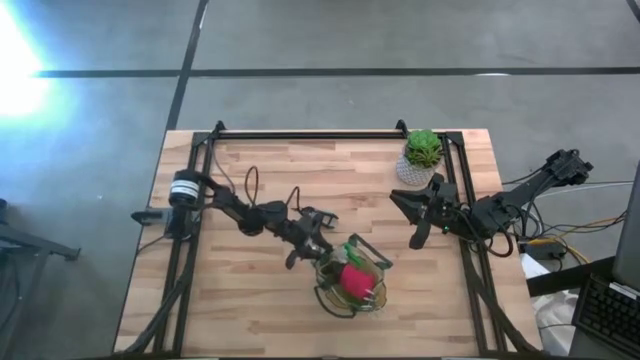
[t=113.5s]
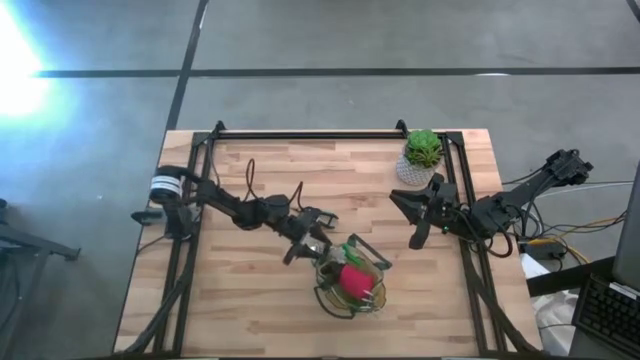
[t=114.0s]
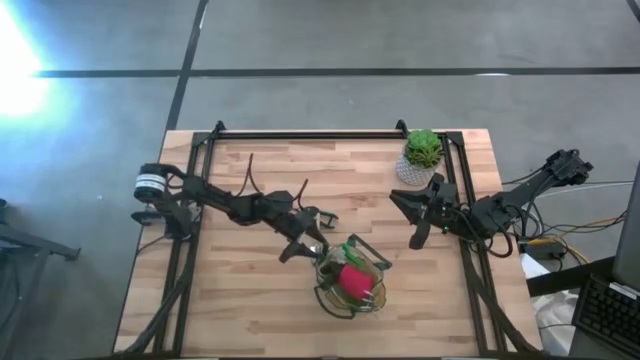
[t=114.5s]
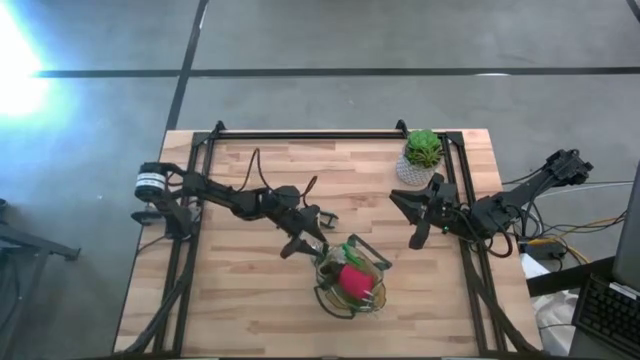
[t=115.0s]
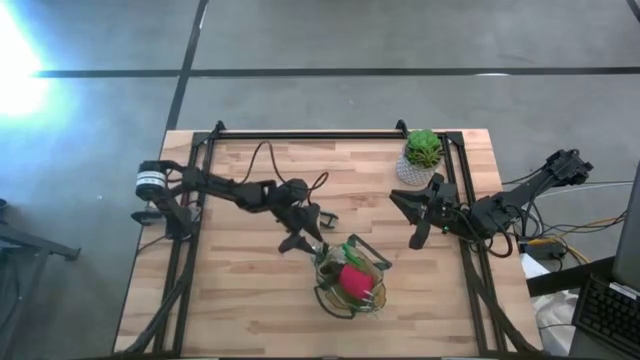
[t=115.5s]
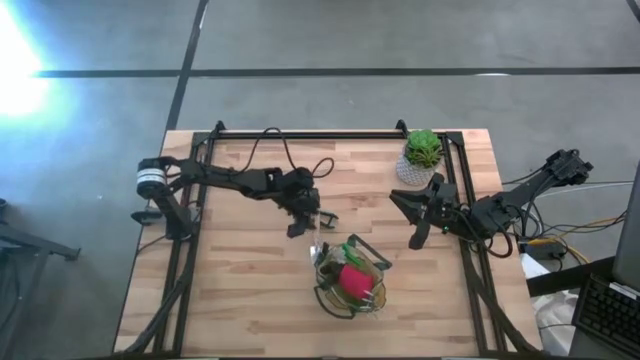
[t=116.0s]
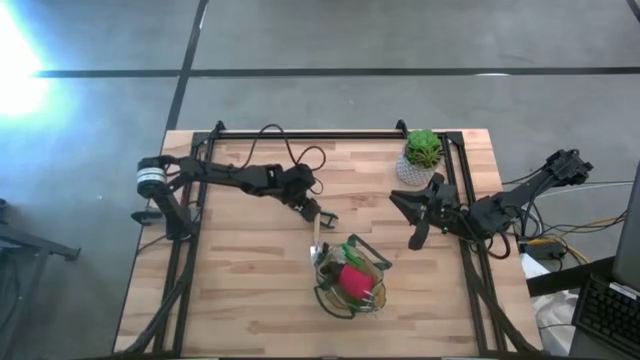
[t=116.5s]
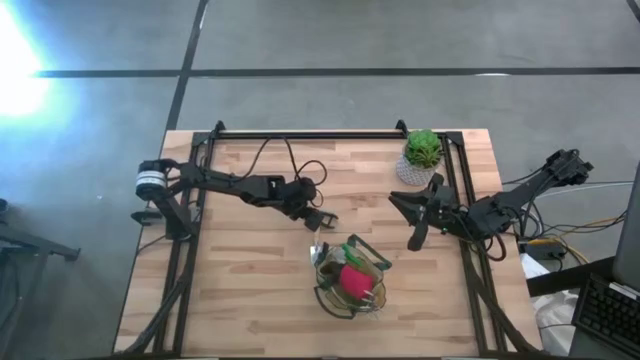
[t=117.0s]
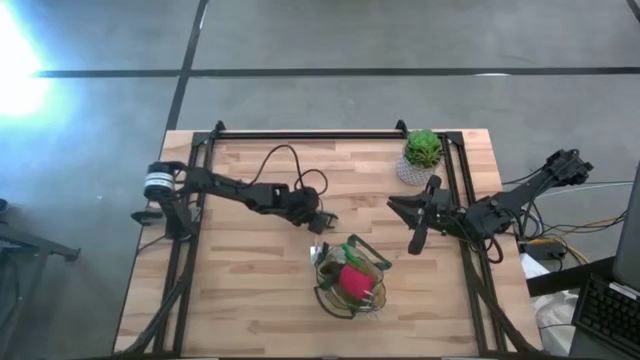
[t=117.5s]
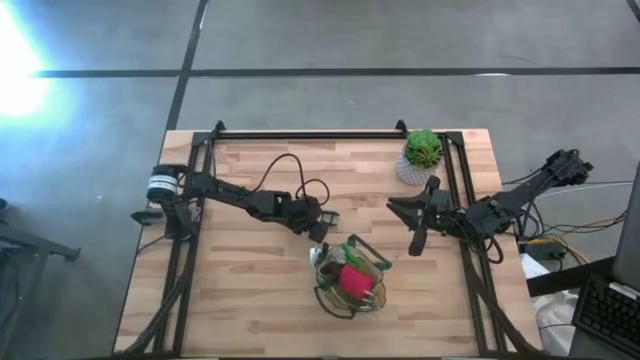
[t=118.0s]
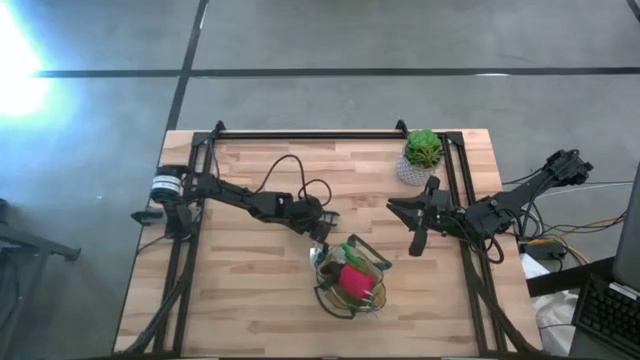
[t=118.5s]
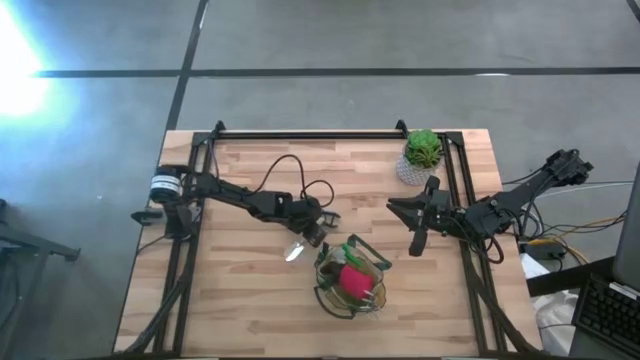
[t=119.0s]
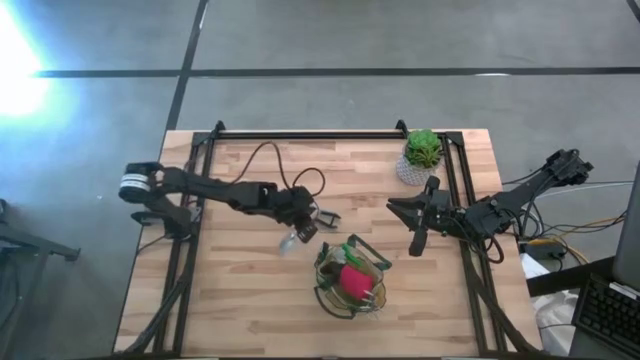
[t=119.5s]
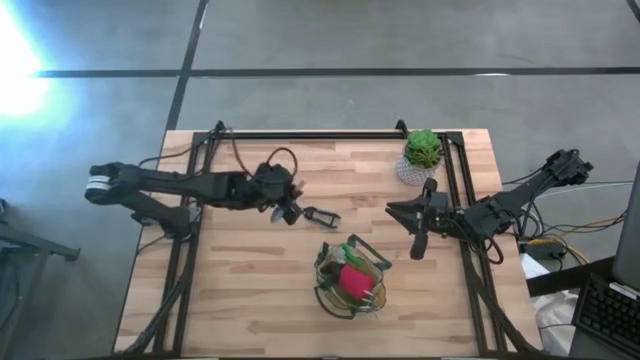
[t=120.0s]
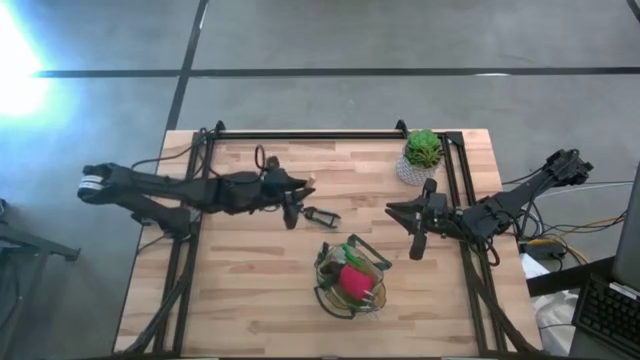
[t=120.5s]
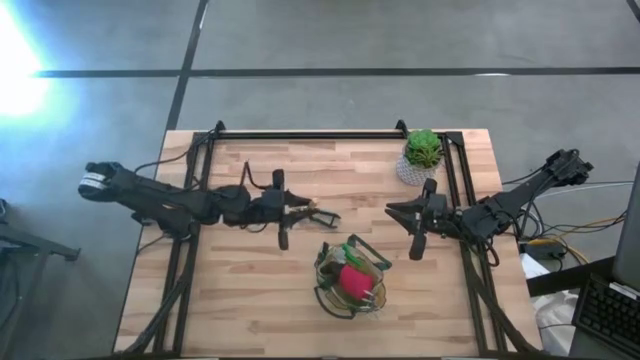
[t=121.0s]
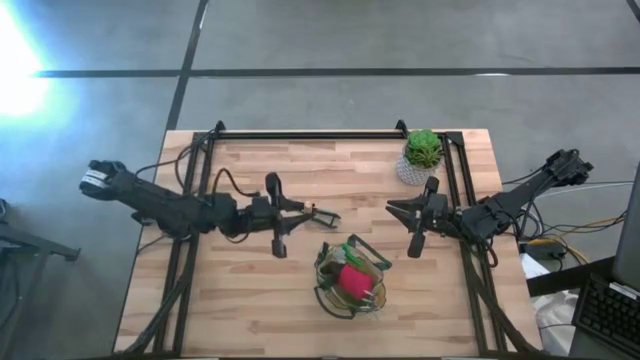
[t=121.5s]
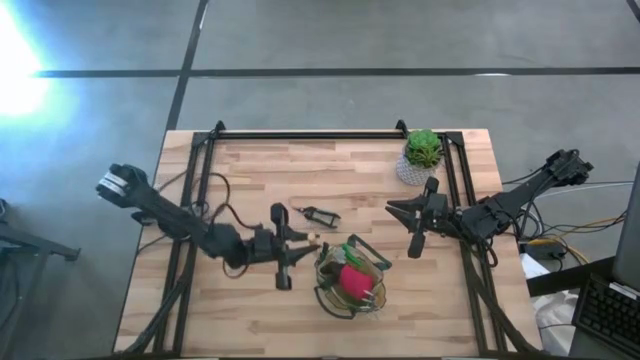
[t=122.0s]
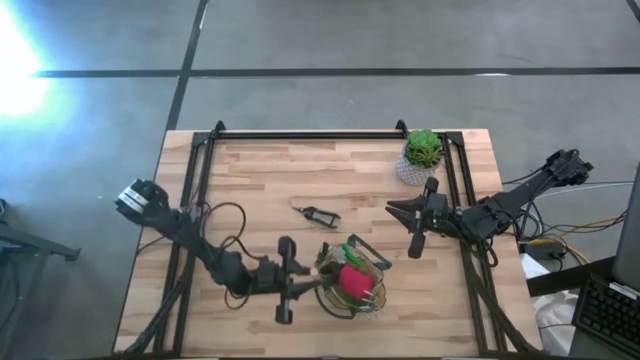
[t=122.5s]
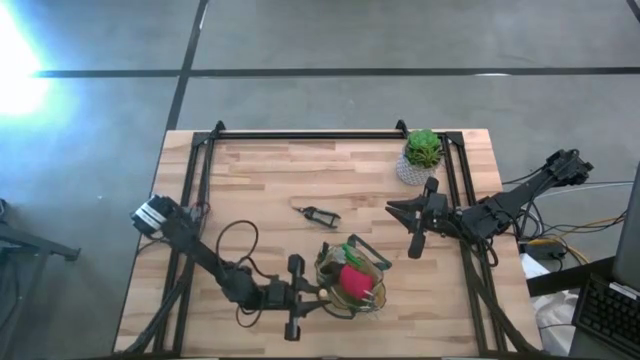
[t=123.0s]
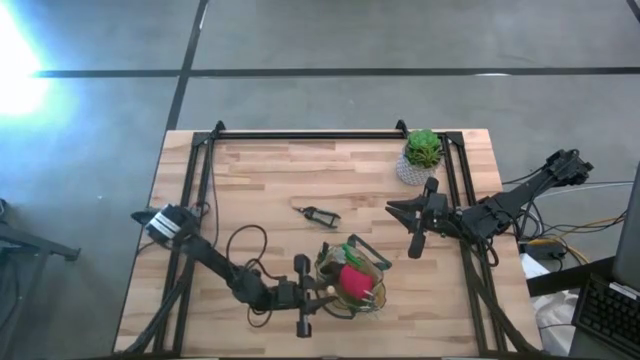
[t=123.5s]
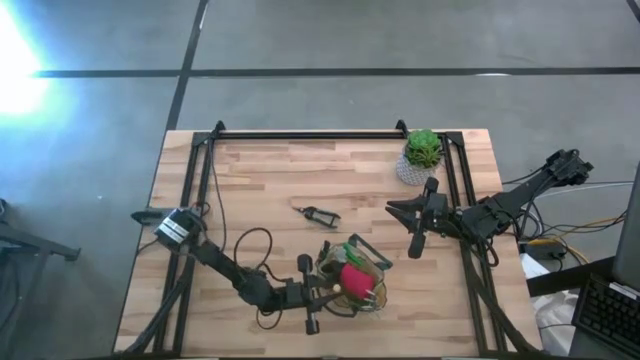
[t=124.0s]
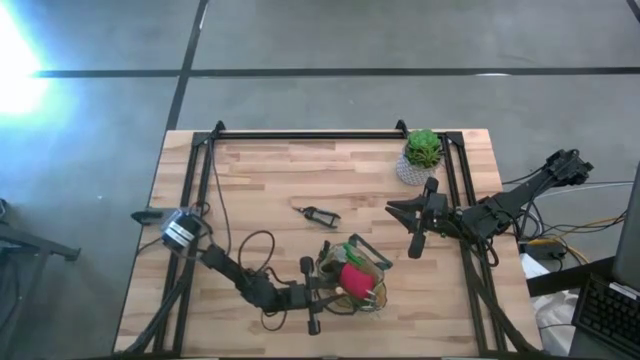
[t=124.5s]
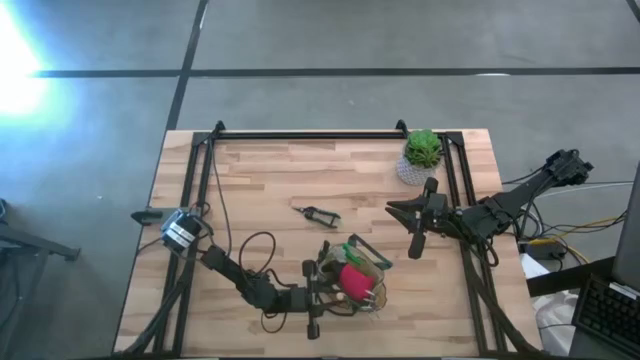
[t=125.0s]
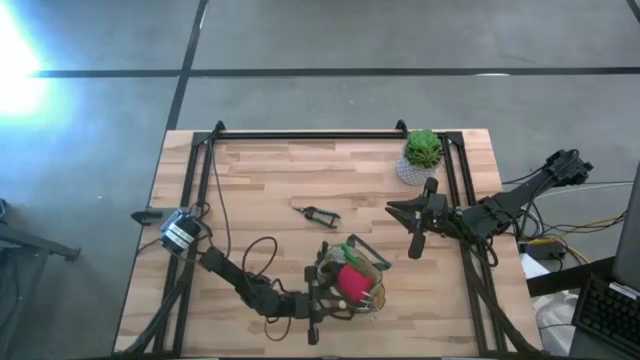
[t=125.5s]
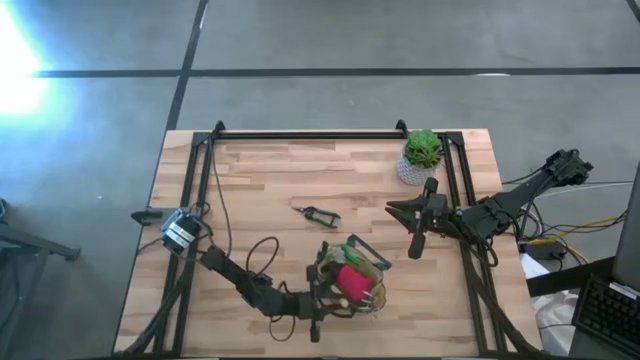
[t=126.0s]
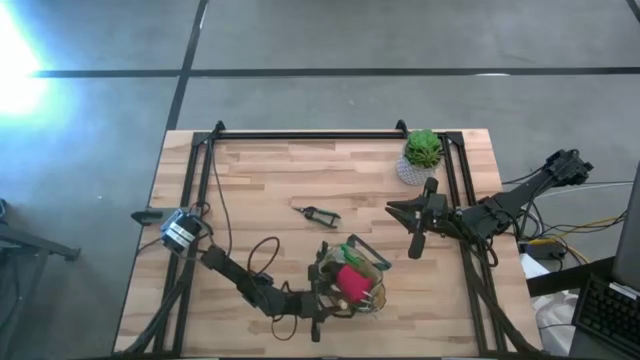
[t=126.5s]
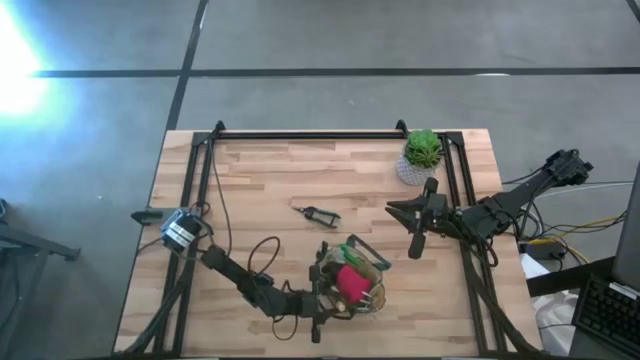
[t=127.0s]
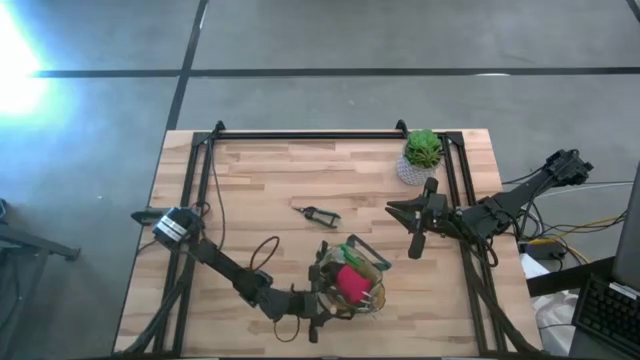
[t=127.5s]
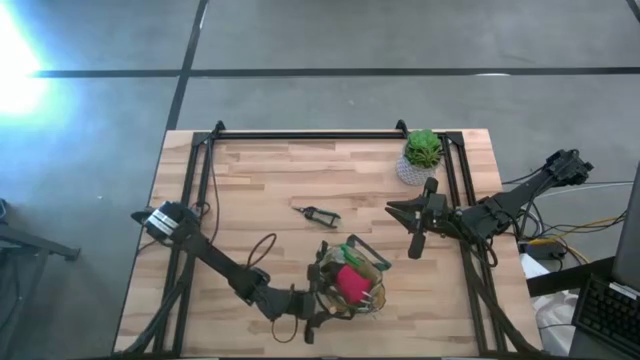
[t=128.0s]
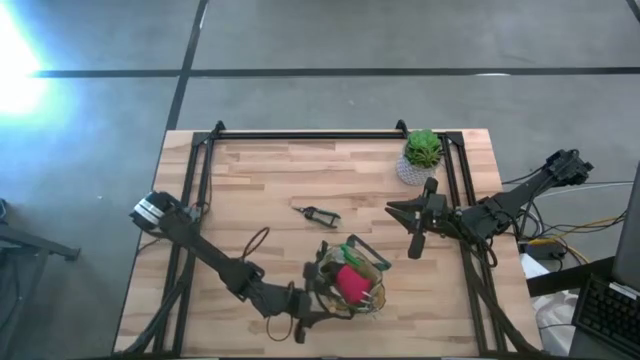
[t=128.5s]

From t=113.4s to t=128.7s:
Task: Pick & Place Garden tools in Gardening bag
Put the brown trowel into the white gardening bag

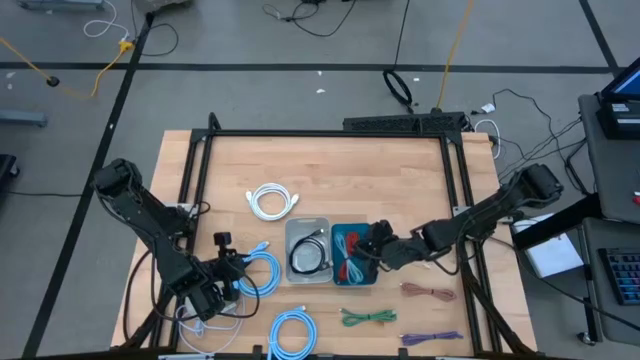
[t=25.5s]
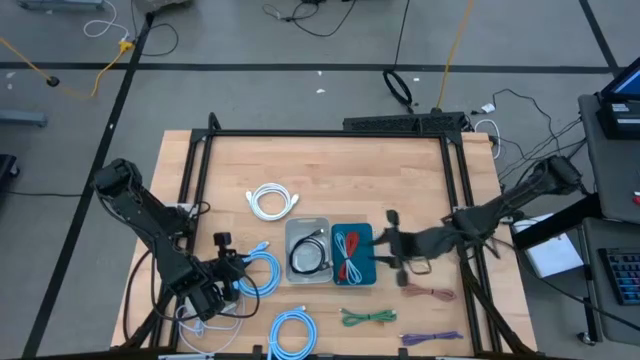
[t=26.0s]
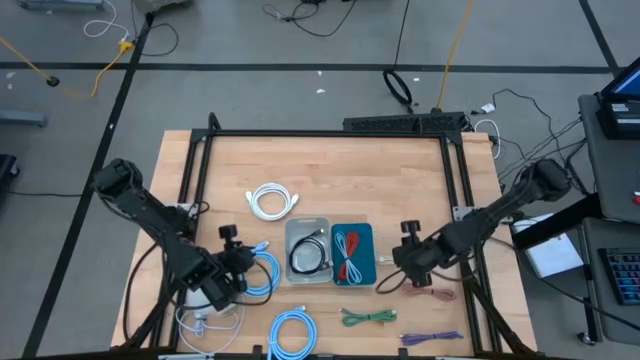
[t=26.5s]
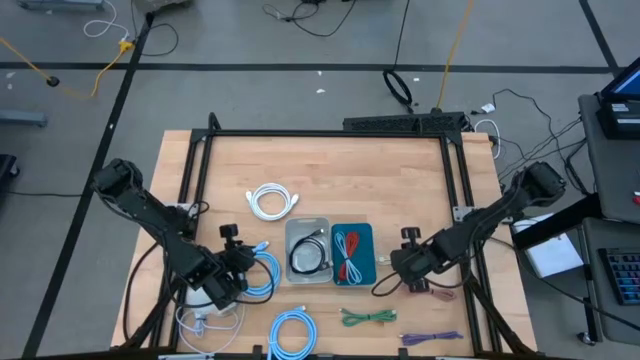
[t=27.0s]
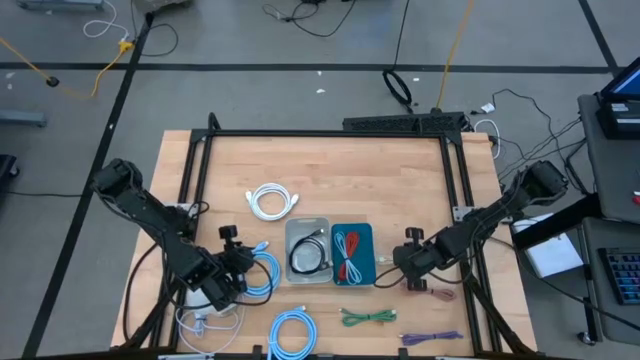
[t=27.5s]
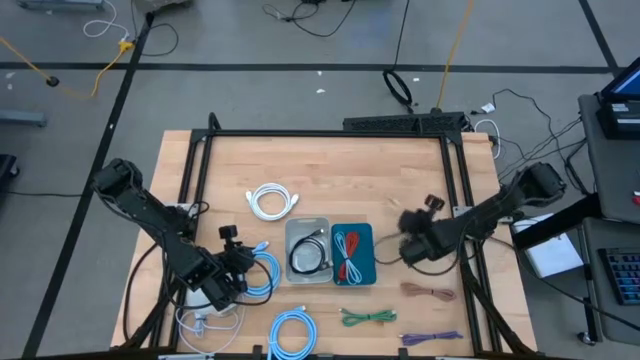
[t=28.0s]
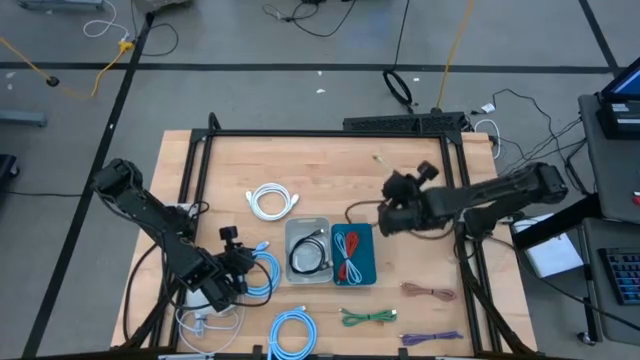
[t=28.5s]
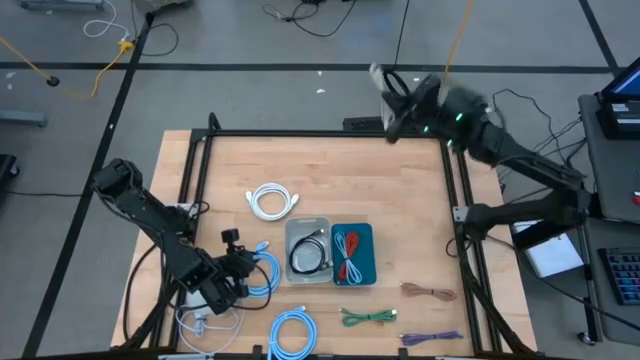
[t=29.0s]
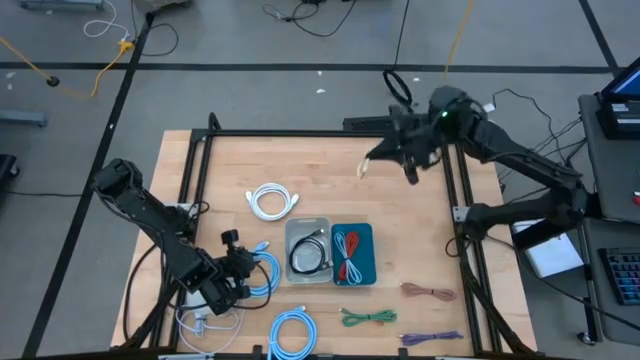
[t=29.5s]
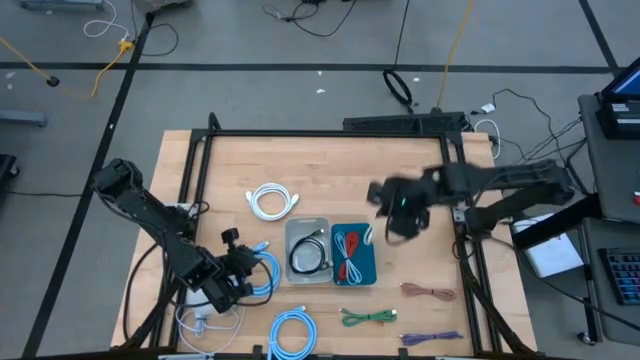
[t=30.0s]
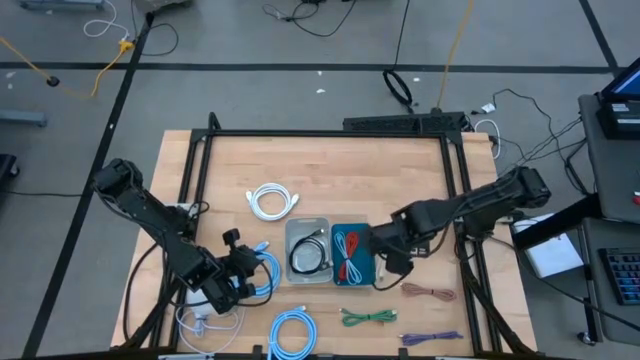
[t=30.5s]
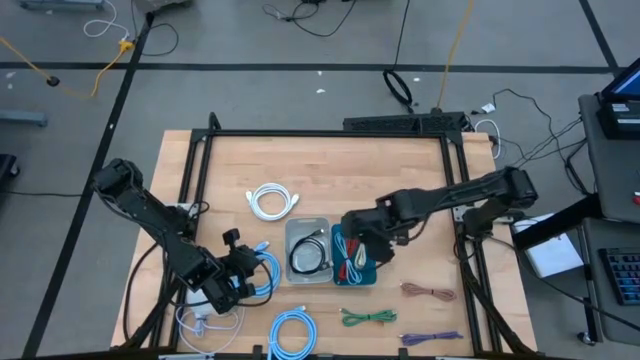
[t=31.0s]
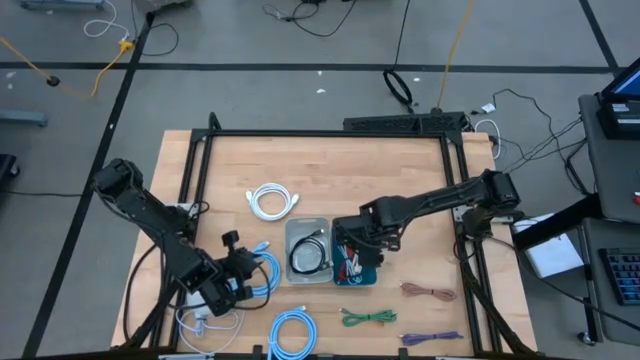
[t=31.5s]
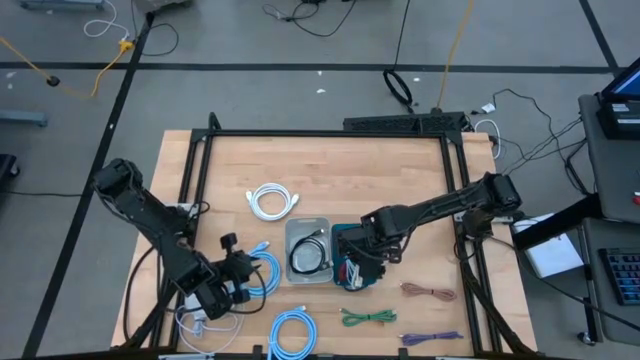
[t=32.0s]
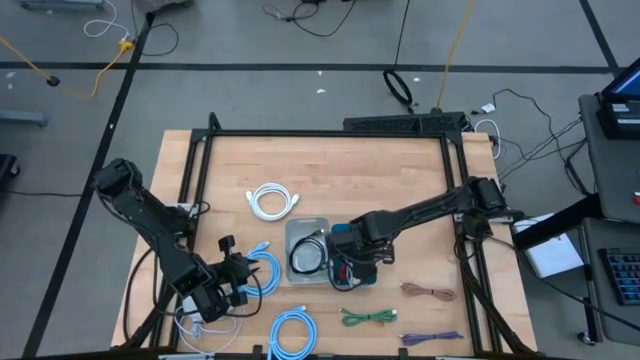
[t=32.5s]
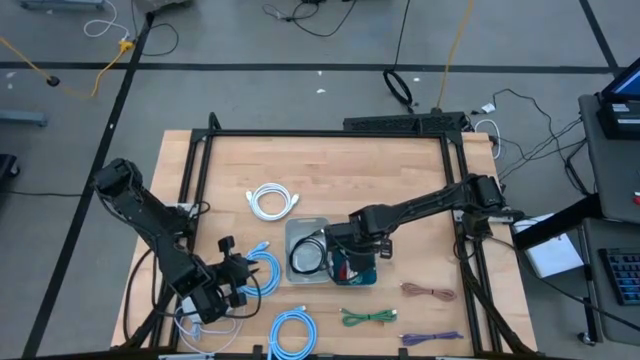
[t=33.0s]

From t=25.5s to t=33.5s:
Task: Pick & Place USB Port
Put the white charger cable into the blue bin
